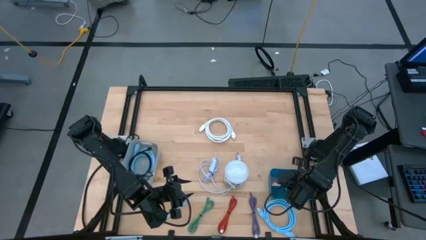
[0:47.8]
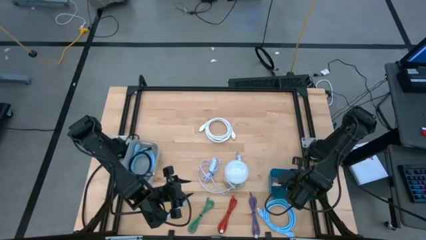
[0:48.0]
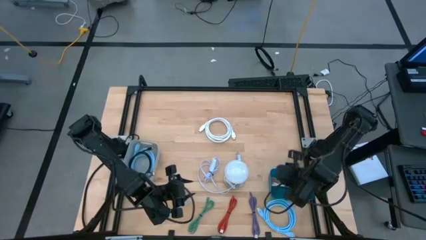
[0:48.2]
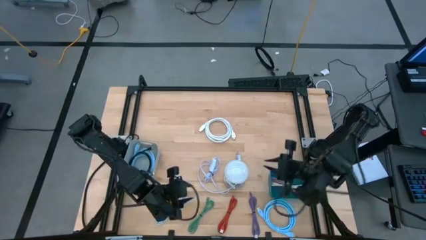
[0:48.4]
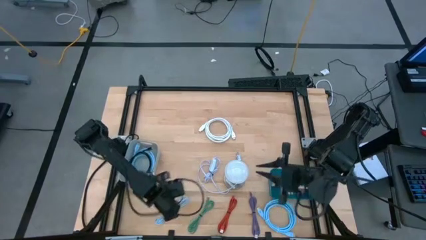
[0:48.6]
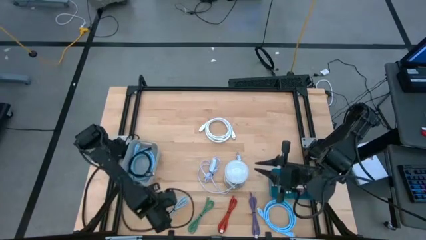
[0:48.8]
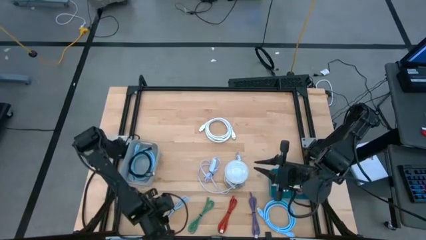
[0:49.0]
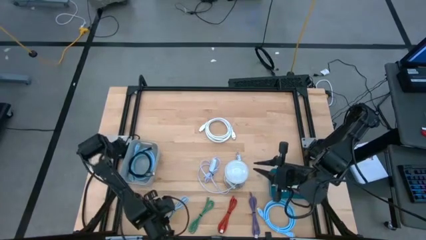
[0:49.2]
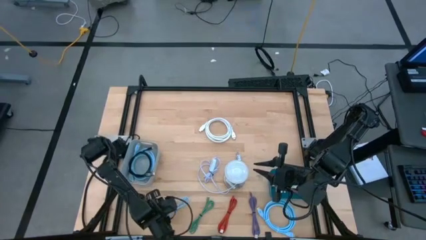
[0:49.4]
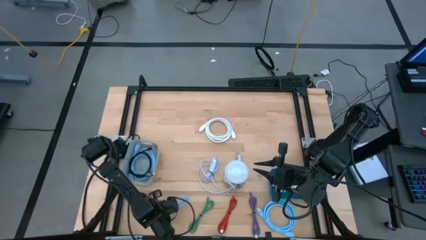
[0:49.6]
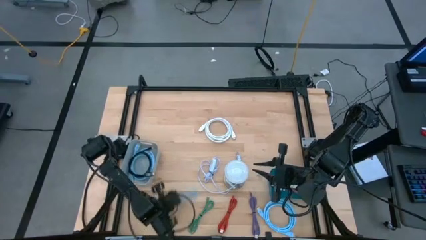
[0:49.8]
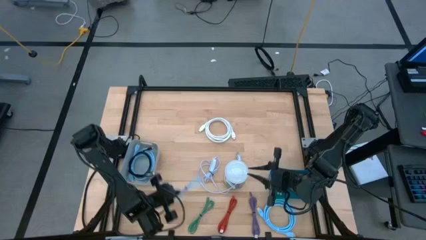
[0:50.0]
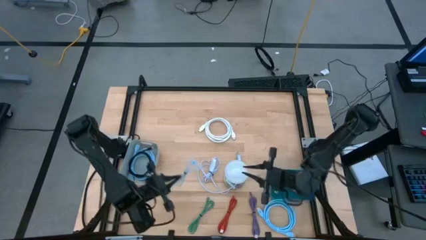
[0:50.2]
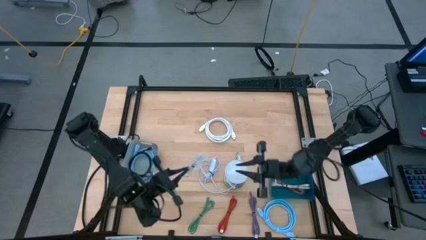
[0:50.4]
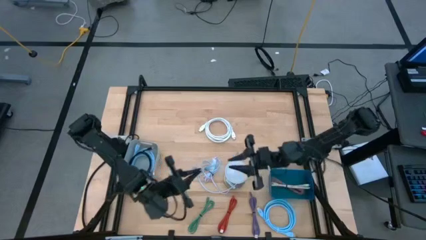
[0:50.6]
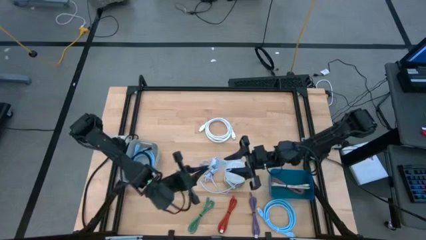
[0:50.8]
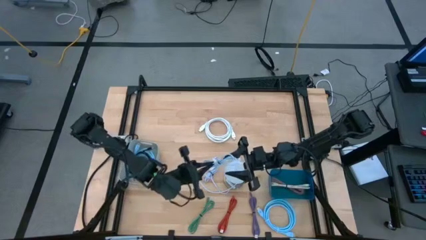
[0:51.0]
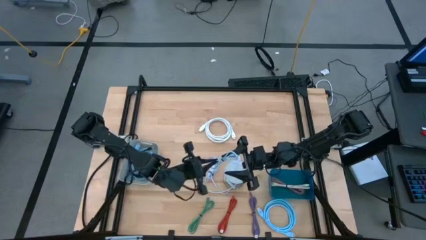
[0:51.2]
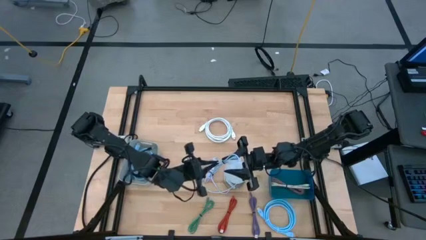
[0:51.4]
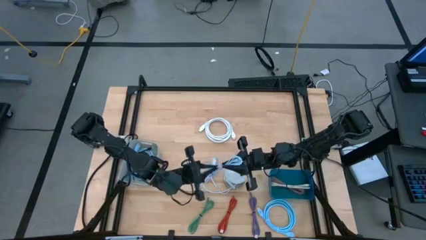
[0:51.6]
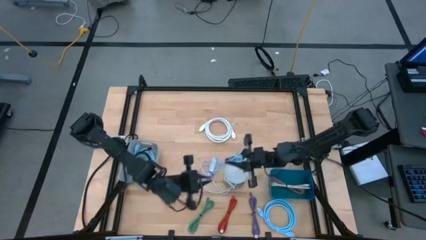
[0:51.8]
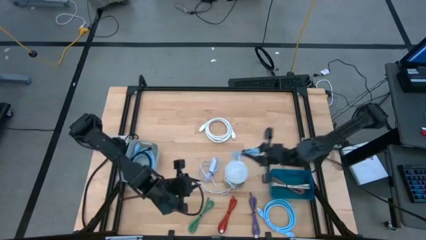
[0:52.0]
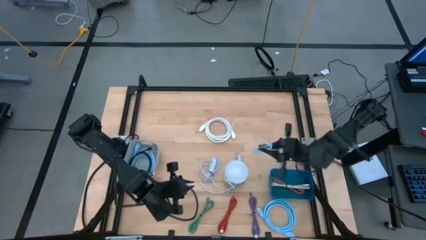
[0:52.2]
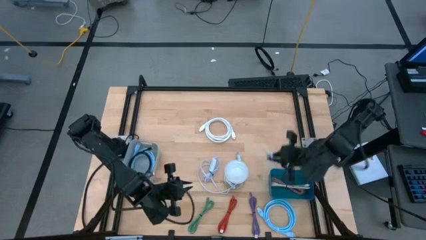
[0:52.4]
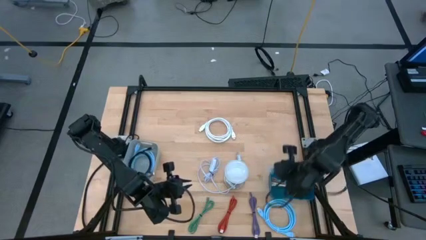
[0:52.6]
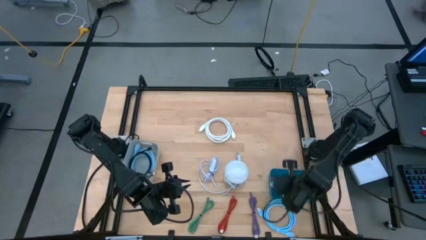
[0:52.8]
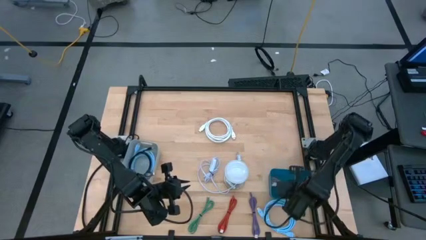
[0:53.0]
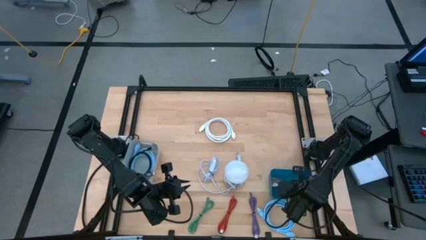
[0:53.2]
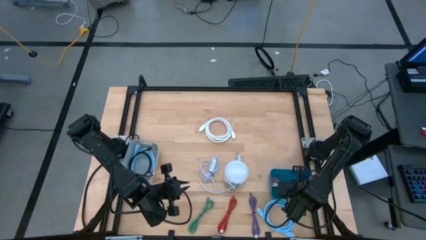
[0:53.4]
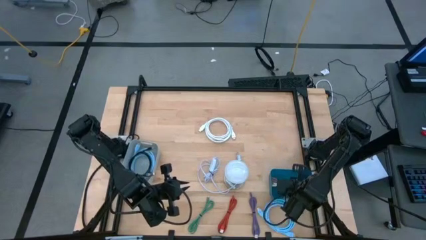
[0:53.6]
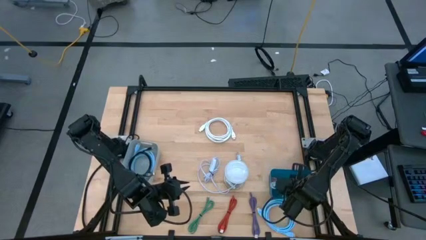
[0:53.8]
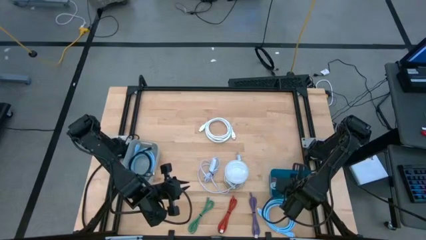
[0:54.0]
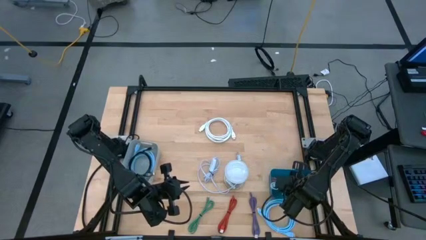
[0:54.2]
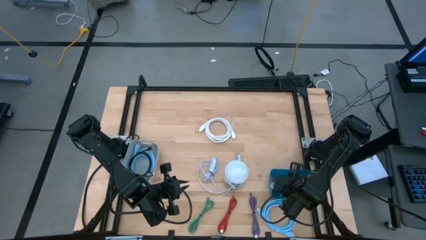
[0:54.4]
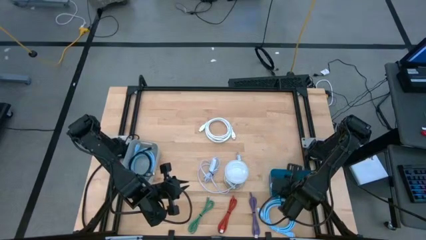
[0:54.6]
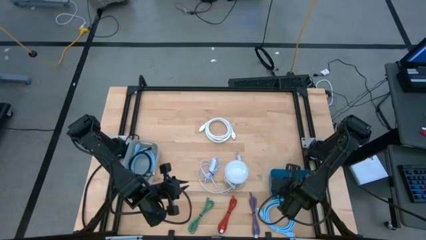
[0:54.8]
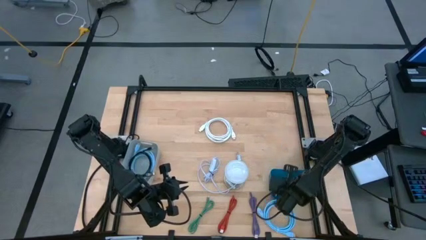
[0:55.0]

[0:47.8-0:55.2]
Task: Pick & Place USB Port
Put the light blue USB cable into the blue bin

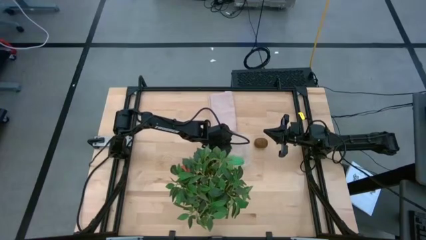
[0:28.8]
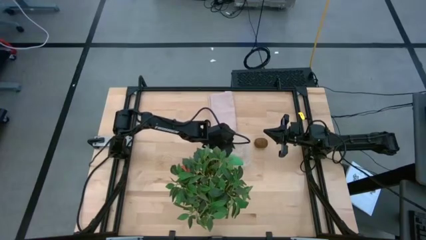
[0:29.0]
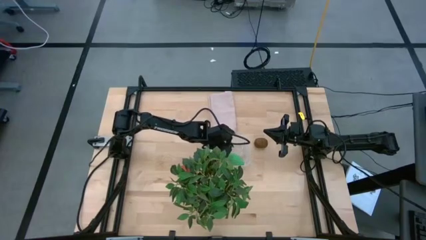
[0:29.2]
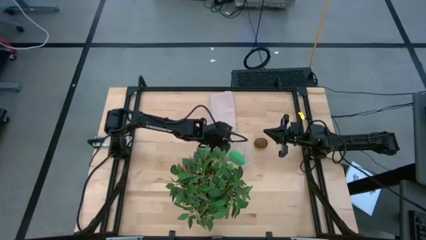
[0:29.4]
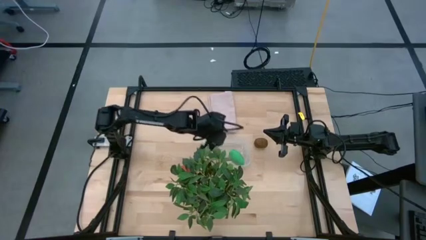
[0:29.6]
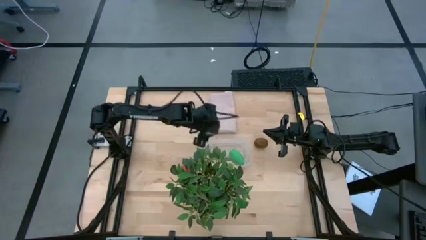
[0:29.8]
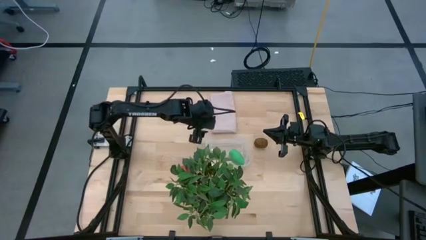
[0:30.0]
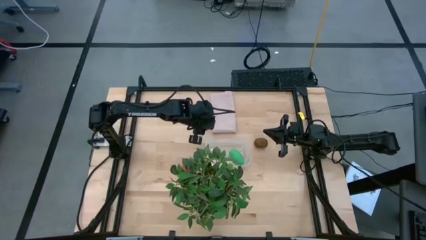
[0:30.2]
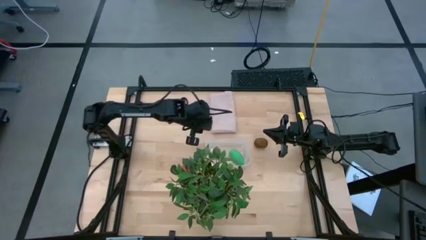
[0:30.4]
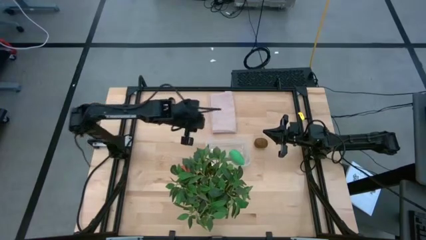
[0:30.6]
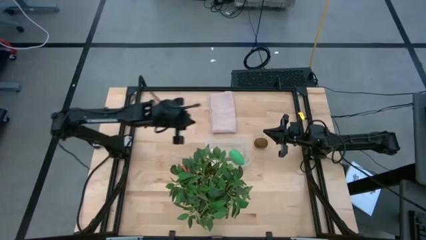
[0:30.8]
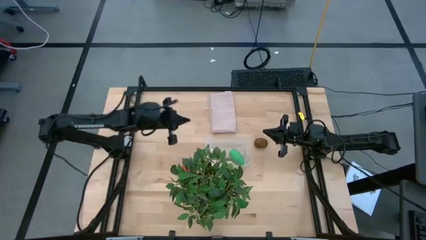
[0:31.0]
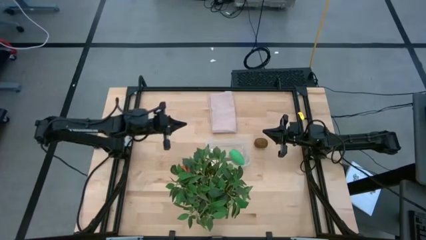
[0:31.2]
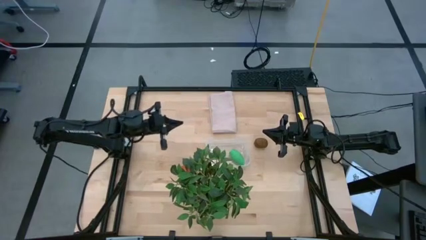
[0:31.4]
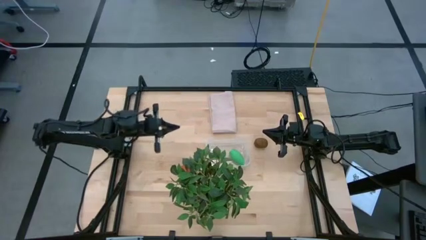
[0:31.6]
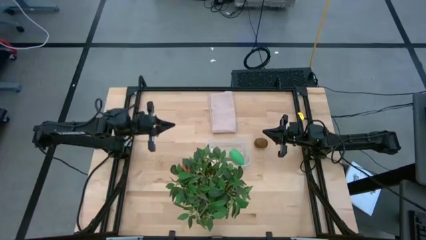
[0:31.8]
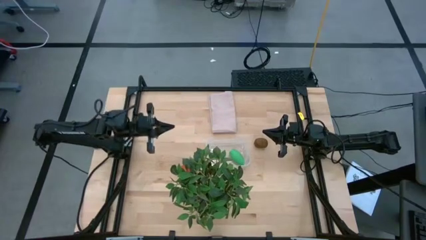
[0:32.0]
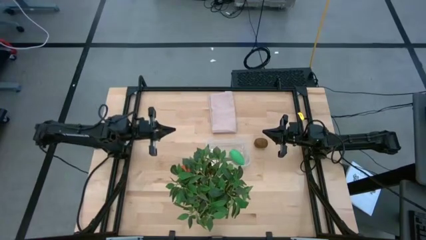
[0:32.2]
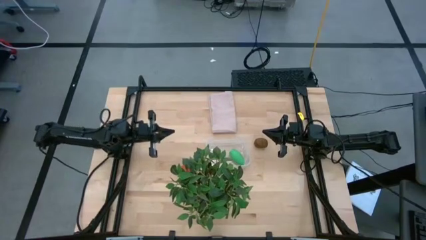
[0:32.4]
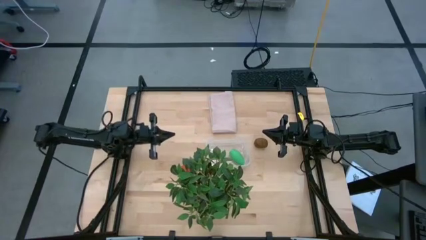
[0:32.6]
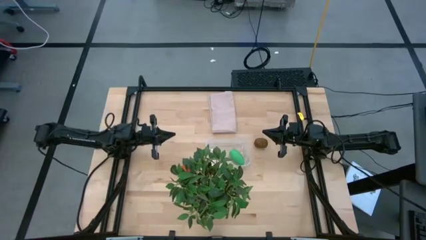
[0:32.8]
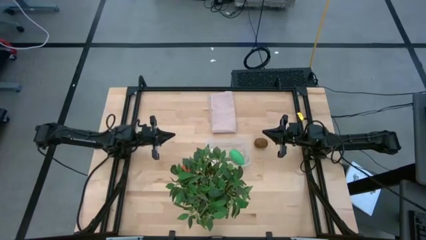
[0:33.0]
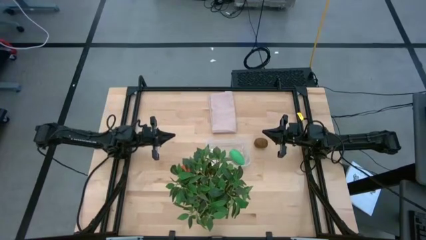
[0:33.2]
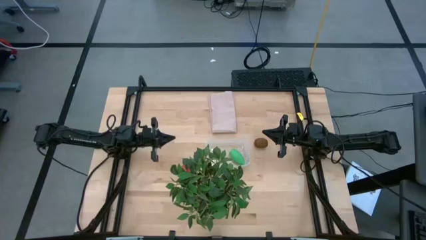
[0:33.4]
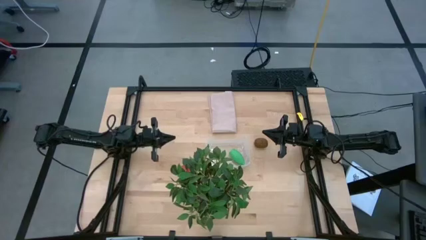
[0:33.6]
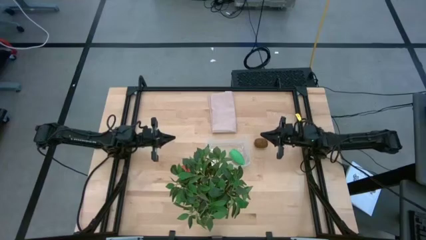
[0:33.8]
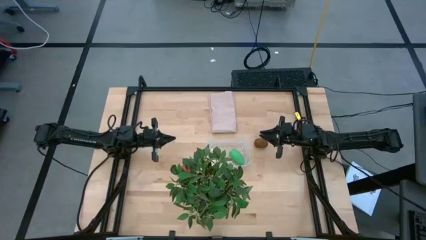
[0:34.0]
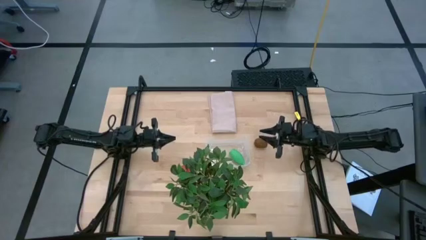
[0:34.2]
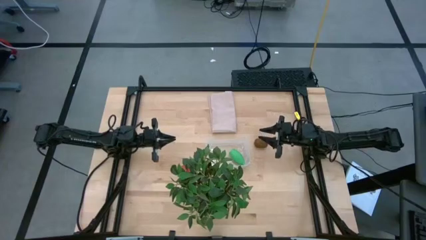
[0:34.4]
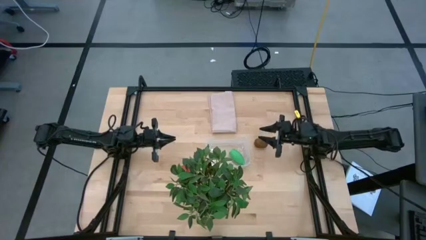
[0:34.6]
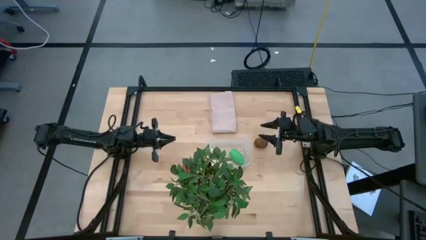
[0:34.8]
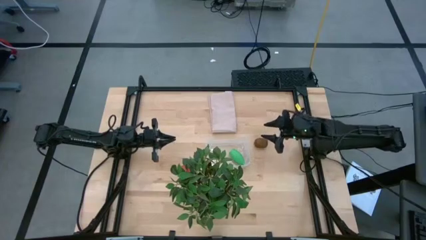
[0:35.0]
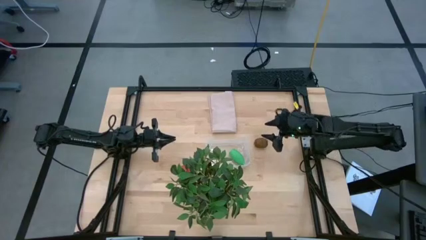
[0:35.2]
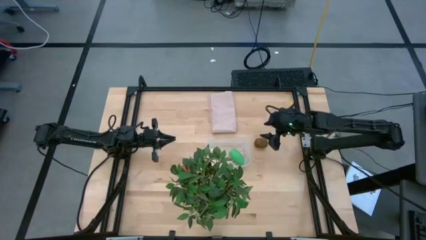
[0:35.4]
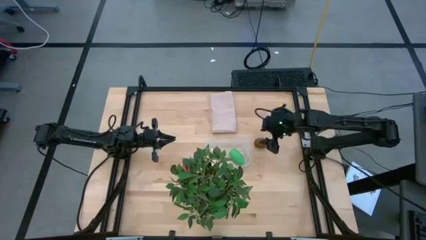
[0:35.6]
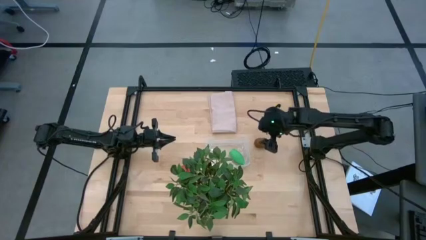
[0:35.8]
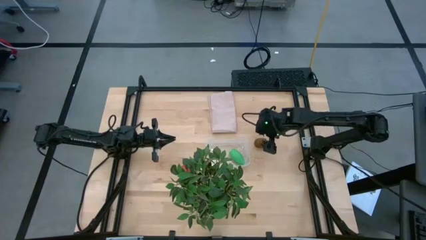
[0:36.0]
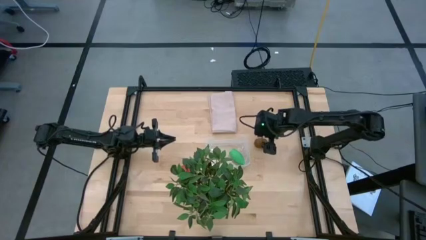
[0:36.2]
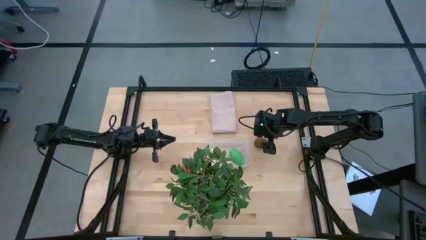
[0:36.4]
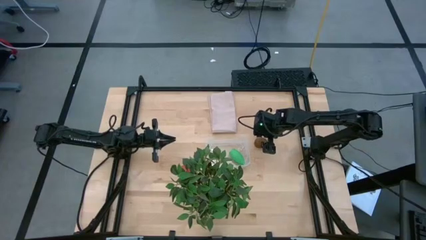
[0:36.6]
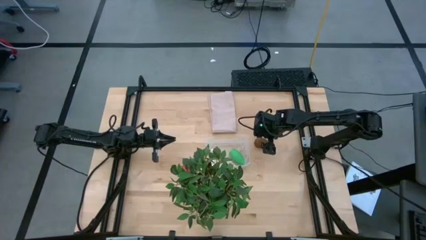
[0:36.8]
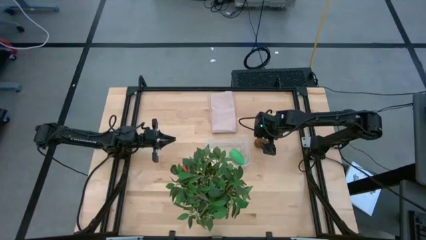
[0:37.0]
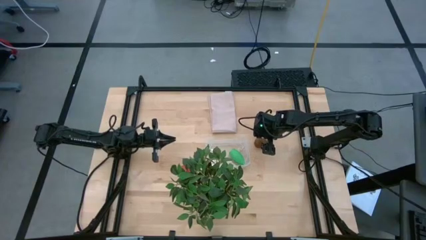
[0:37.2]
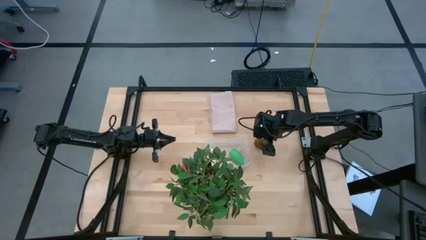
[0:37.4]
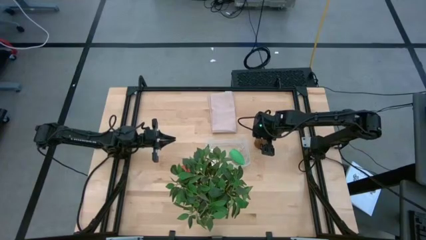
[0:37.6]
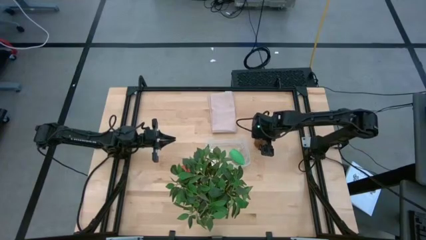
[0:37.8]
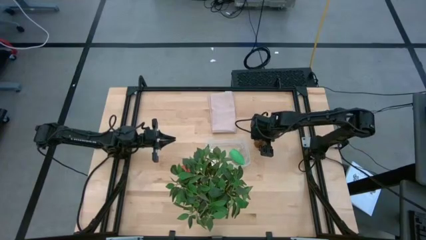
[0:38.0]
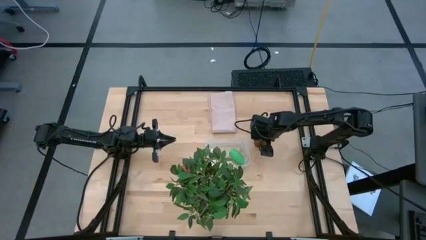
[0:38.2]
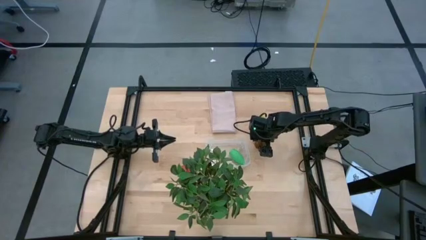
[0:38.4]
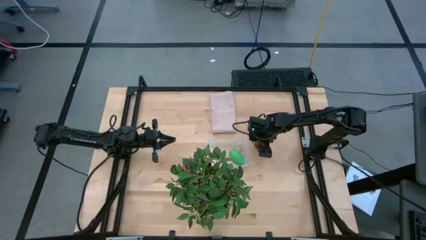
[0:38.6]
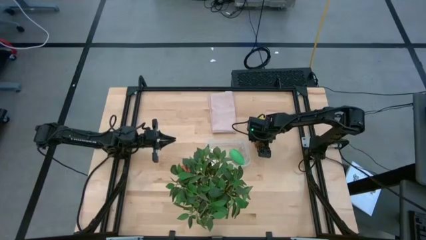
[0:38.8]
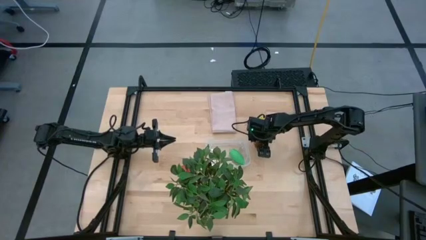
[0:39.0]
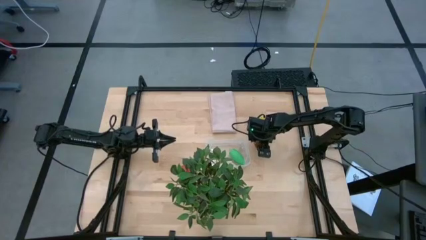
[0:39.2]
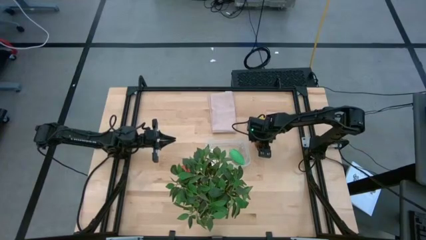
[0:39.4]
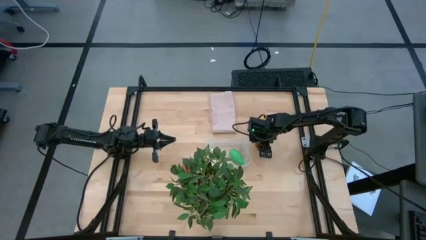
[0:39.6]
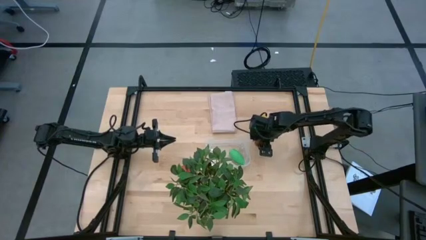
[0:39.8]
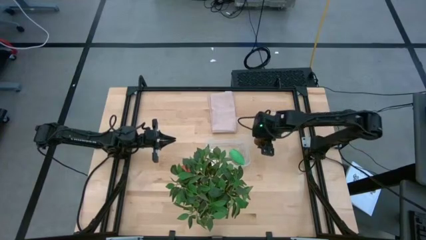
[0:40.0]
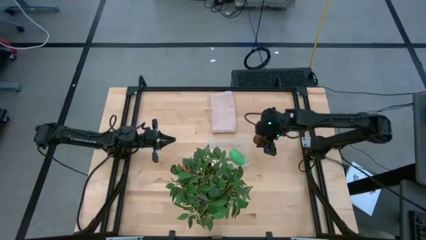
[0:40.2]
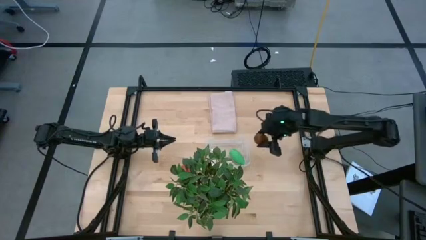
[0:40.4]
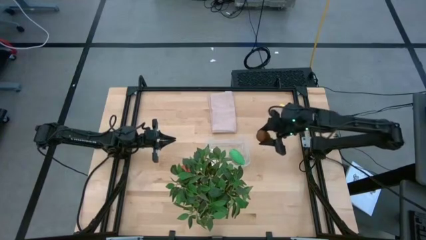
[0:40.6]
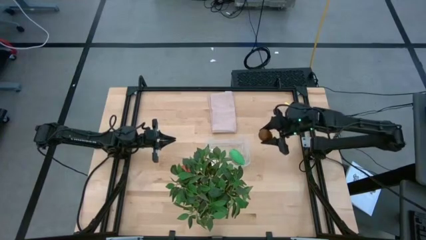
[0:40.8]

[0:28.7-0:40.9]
Task: Pick and placing Produce into tupperware
Put the kiwi into the transparent bin
